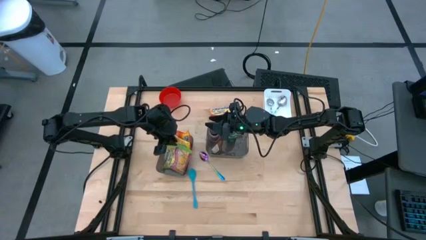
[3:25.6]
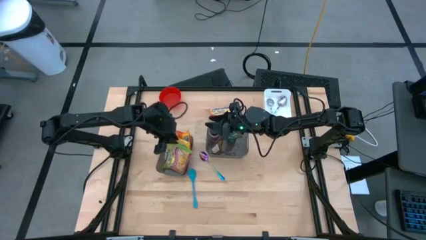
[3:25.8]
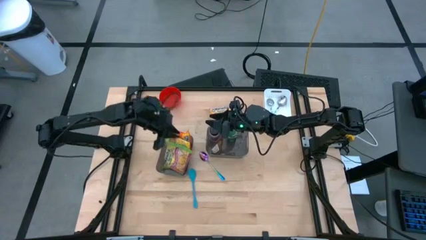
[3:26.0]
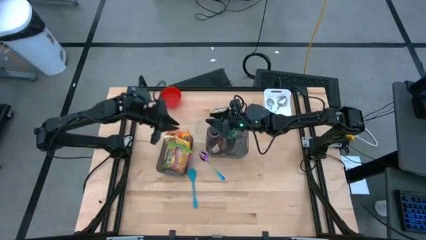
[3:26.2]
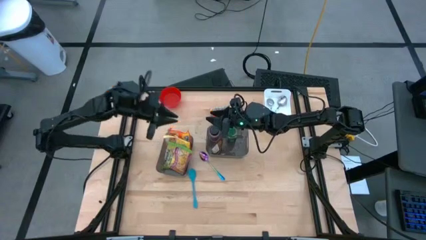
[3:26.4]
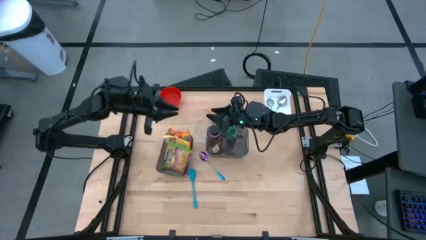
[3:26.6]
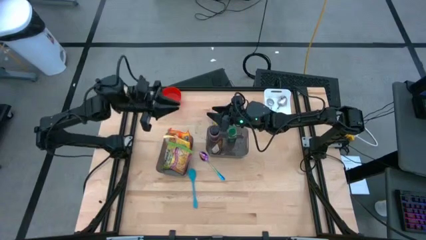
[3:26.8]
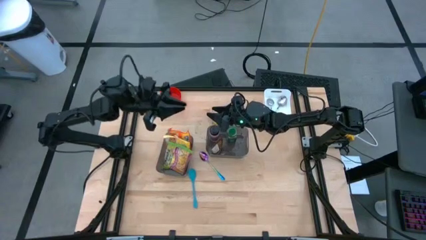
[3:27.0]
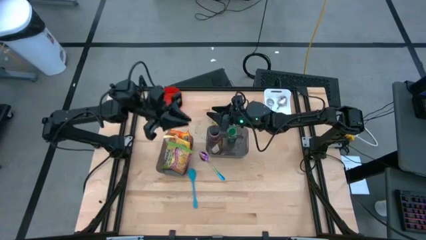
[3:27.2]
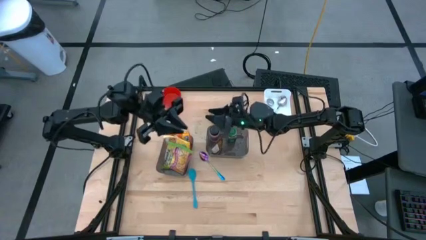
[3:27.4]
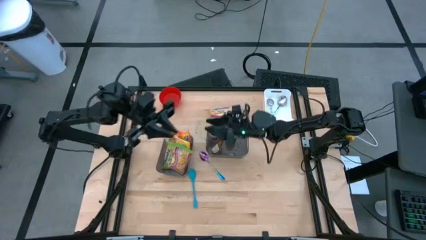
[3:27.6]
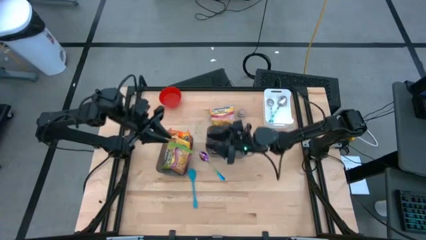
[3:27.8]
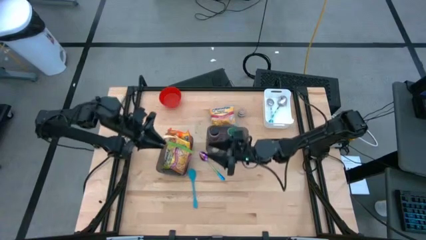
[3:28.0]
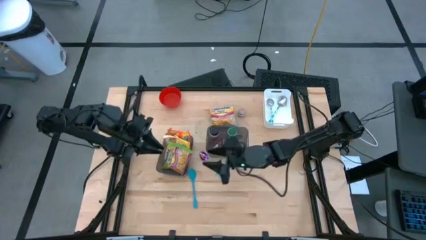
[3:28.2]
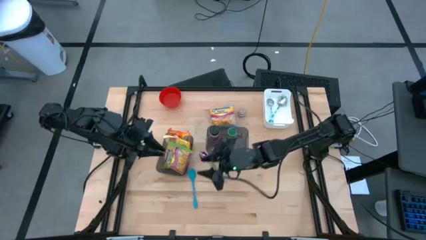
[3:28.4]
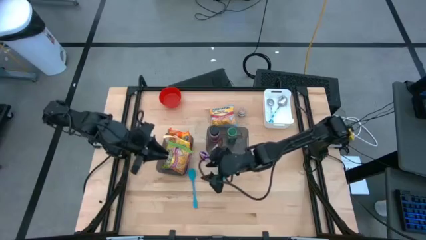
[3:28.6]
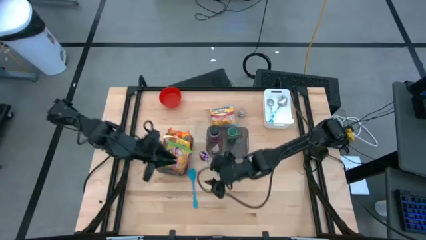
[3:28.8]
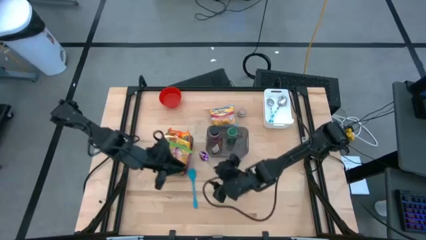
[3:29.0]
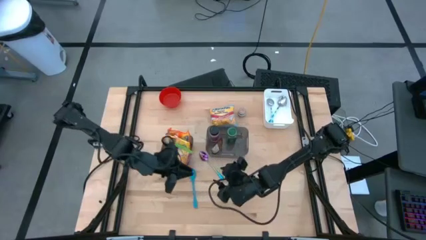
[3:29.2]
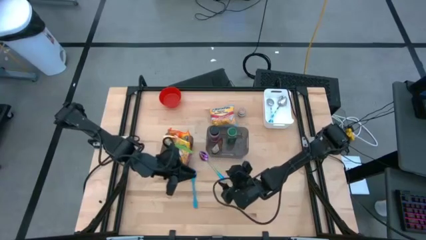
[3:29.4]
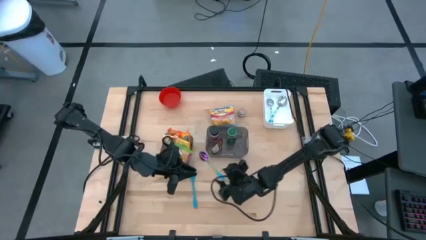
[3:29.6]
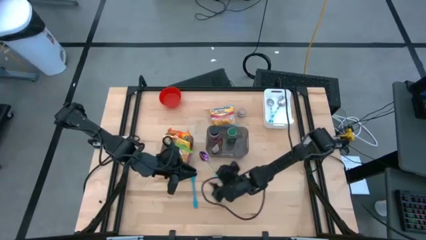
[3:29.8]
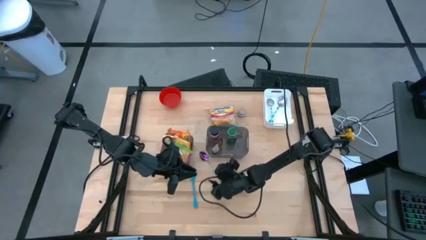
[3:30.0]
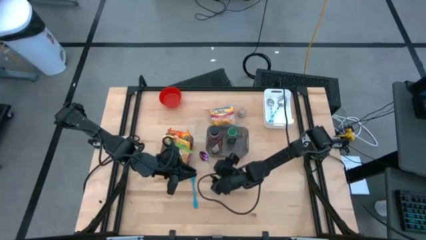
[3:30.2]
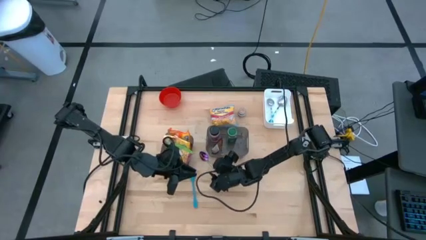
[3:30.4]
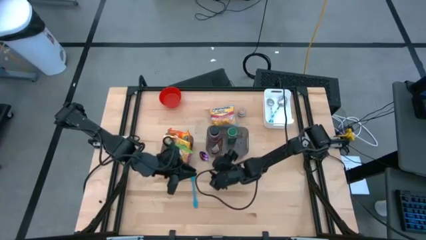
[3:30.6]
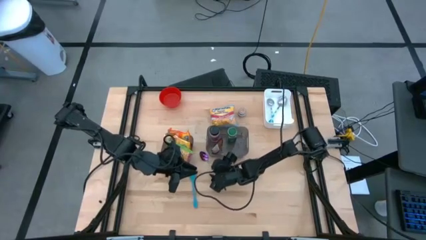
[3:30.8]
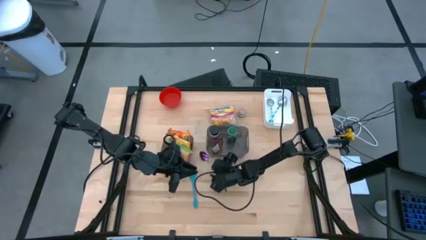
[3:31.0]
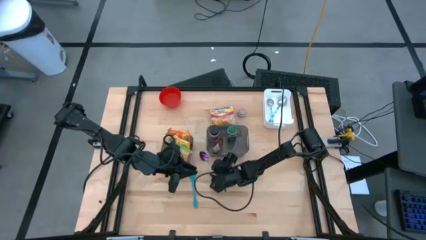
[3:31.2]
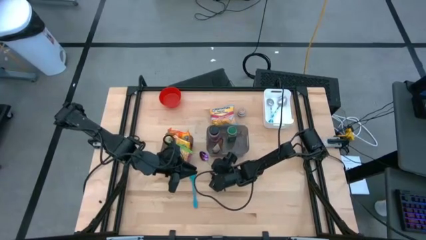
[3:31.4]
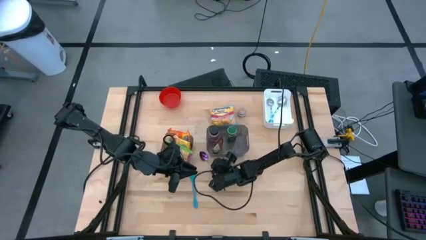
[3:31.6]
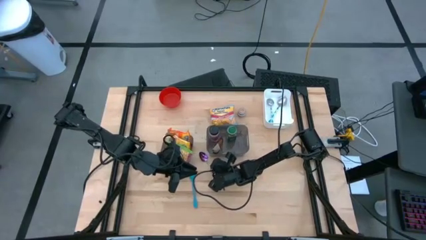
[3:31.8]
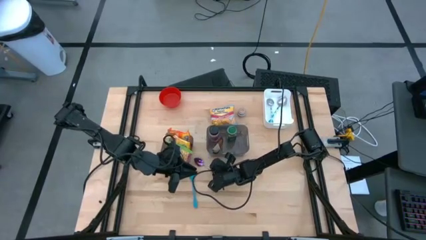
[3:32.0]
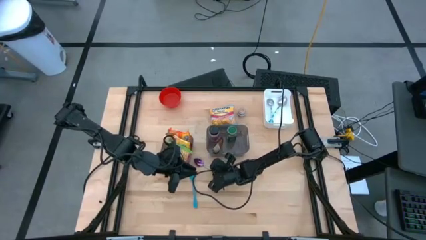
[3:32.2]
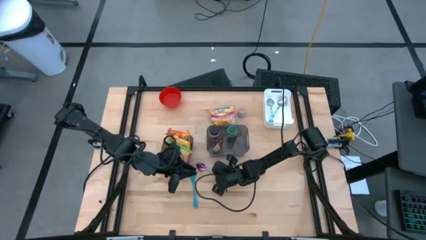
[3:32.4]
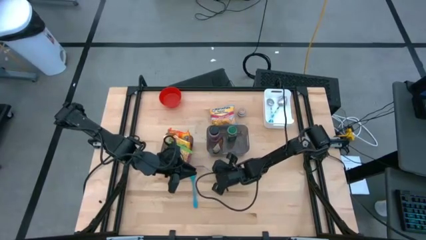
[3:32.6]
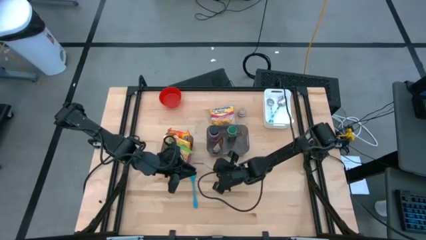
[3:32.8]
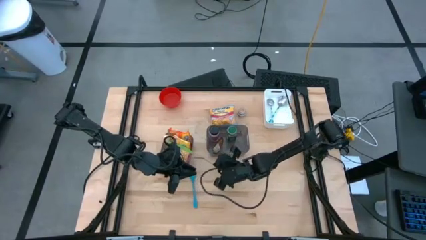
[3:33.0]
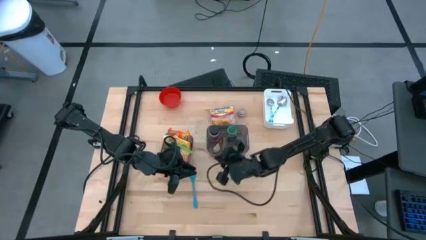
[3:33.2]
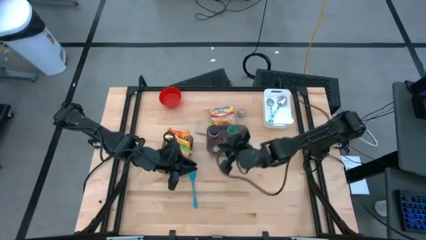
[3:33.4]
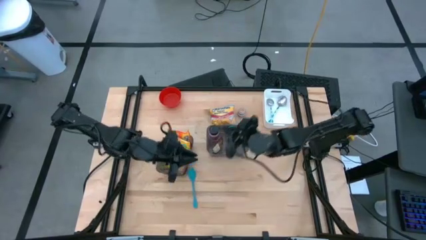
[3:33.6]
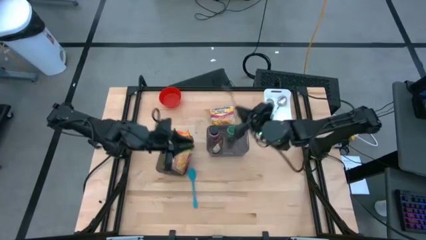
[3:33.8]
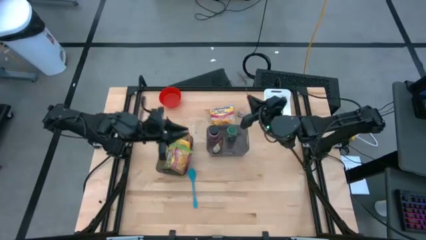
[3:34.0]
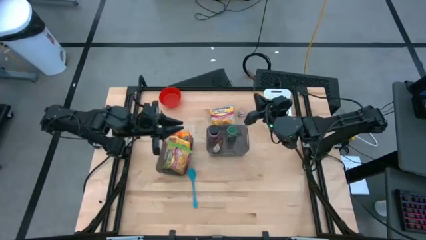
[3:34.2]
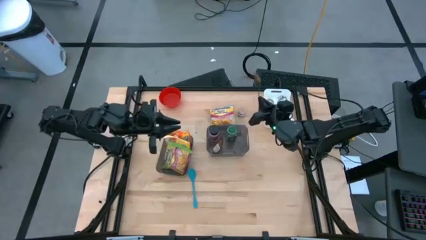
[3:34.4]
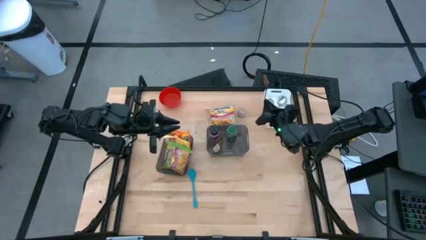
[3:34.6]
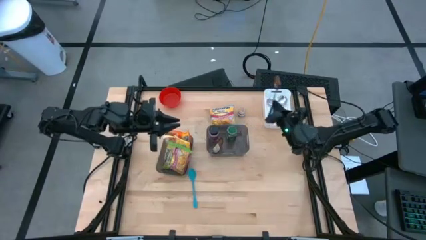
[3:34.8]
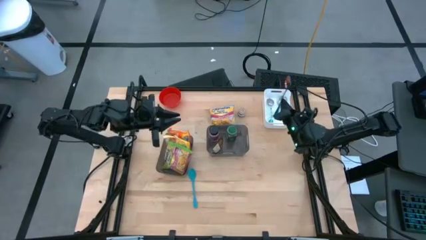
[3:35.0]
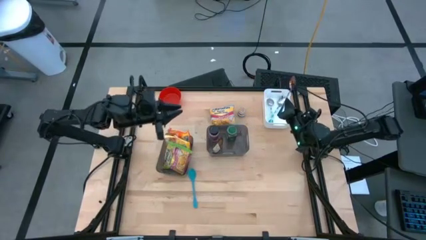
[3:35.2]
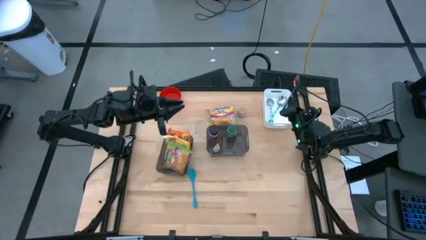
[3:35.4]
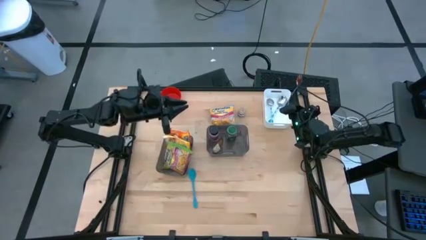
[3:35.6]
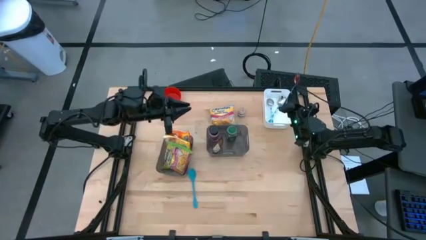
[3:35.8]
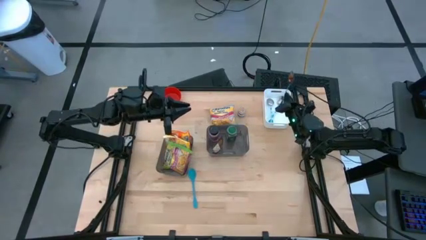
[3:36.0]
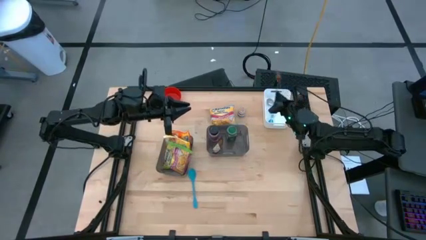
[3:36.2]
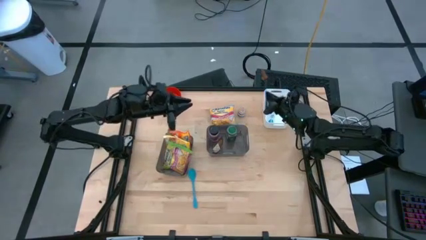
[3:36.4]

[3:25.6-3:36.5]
Task: Pick & Place Food Item
Put the blue spoon into the white bin
